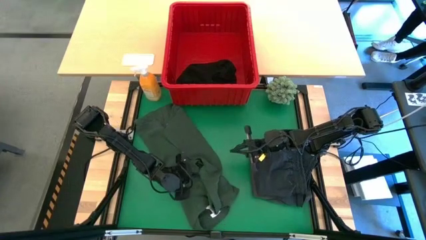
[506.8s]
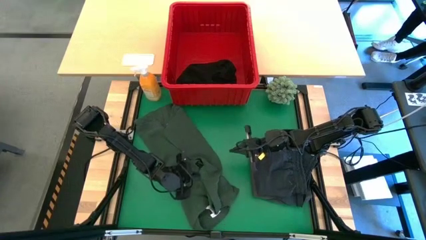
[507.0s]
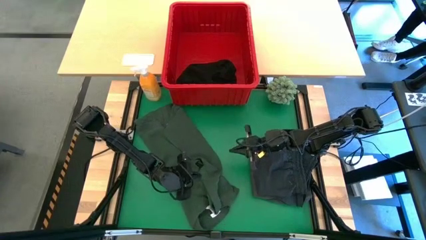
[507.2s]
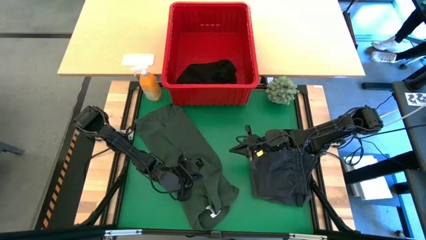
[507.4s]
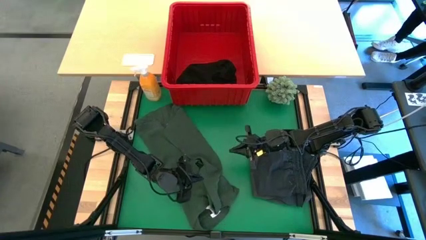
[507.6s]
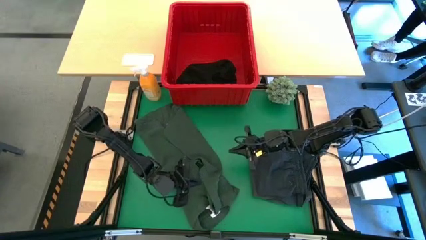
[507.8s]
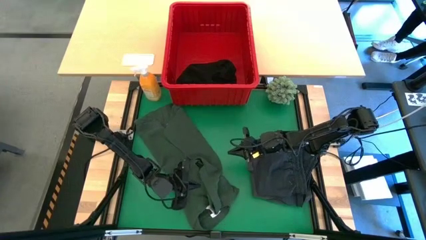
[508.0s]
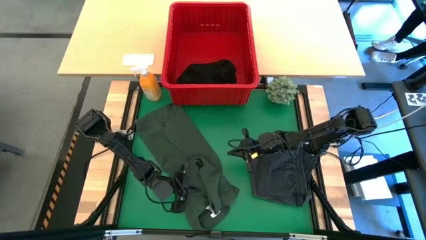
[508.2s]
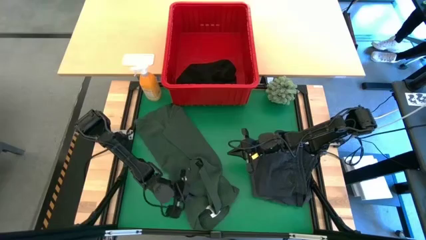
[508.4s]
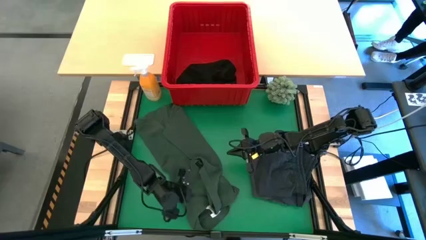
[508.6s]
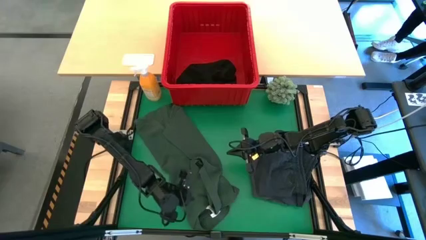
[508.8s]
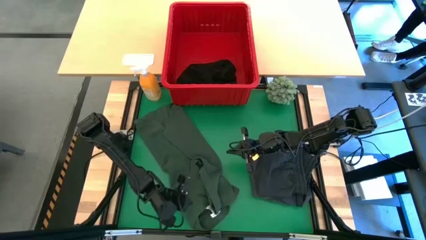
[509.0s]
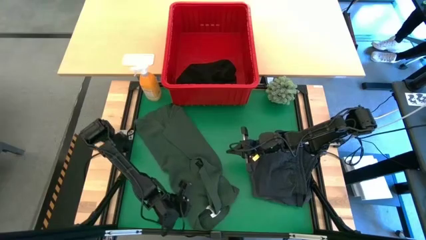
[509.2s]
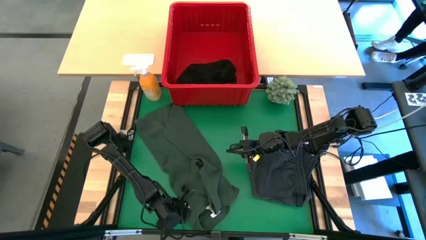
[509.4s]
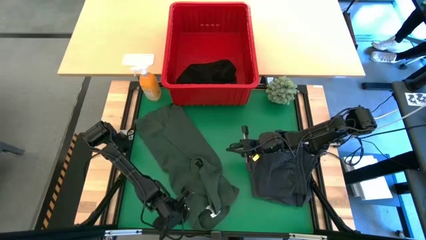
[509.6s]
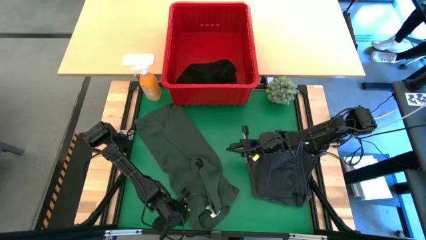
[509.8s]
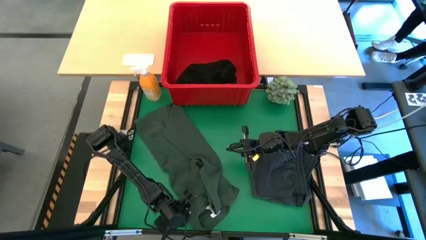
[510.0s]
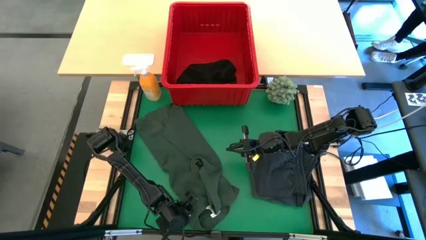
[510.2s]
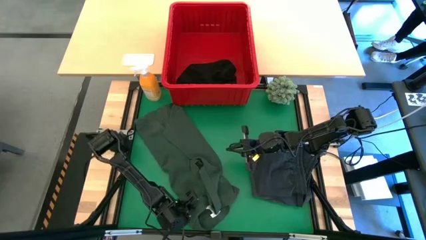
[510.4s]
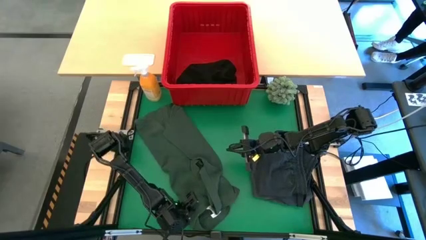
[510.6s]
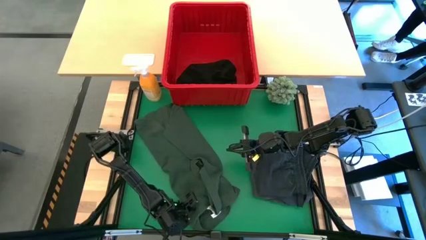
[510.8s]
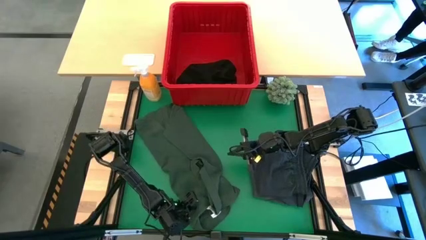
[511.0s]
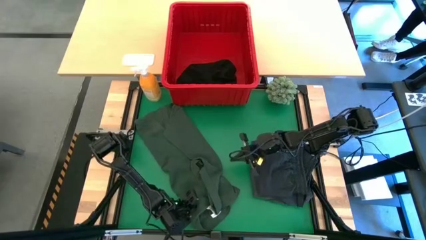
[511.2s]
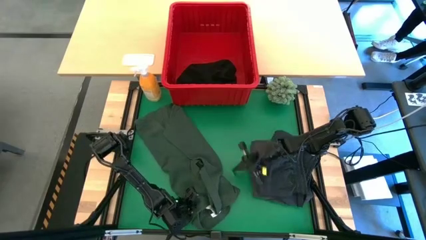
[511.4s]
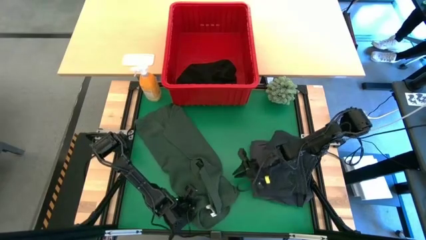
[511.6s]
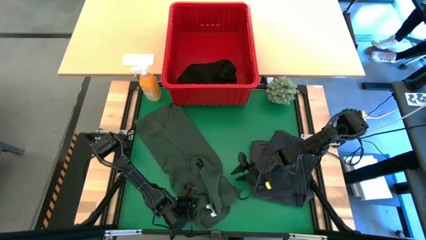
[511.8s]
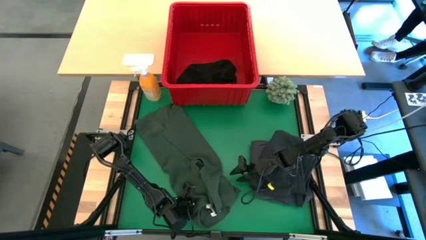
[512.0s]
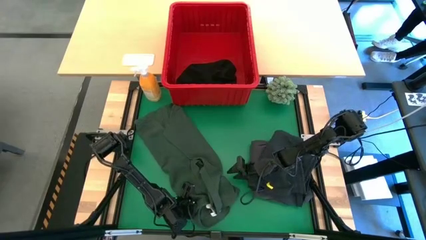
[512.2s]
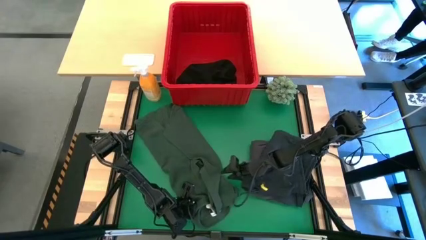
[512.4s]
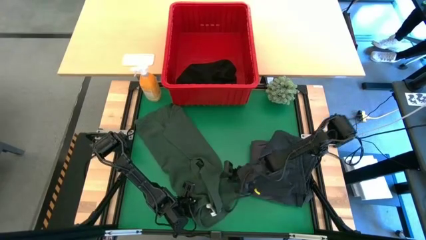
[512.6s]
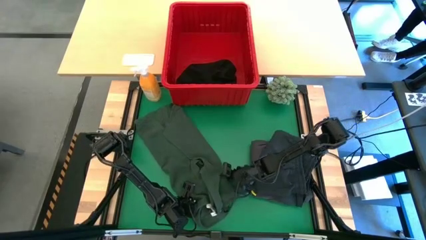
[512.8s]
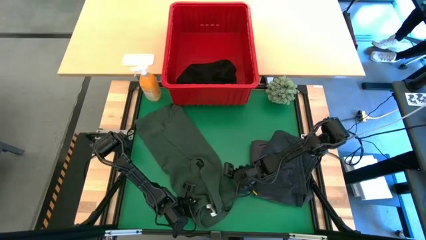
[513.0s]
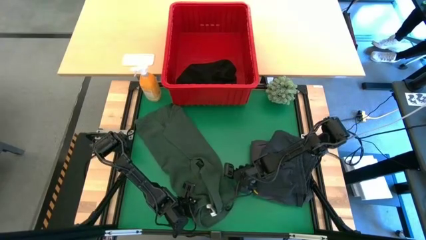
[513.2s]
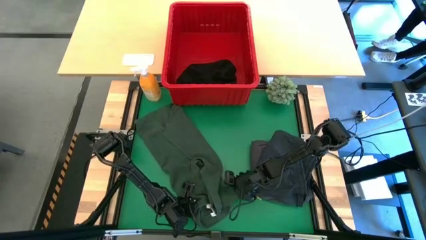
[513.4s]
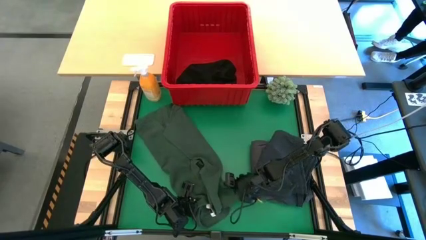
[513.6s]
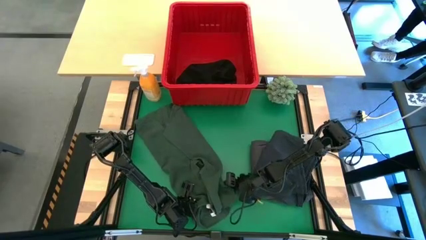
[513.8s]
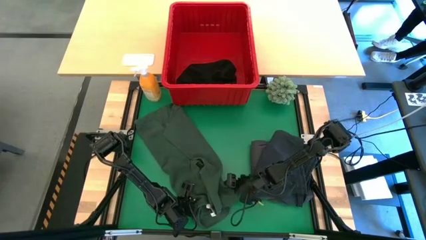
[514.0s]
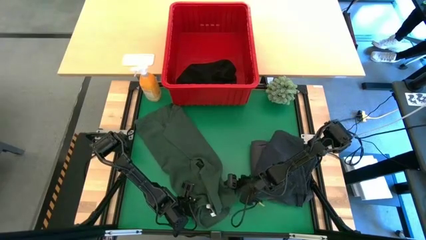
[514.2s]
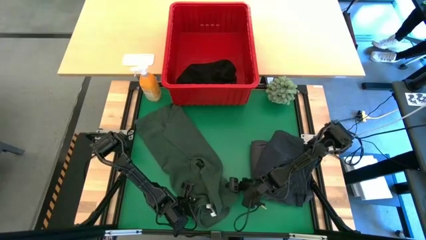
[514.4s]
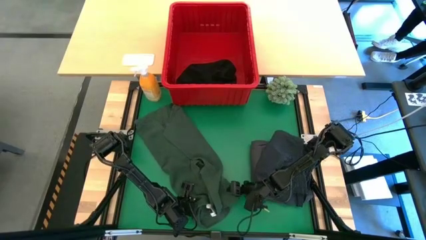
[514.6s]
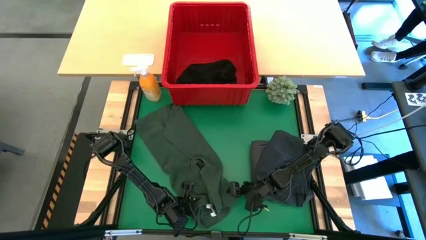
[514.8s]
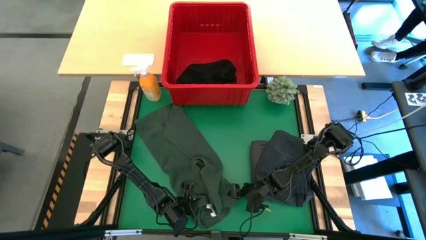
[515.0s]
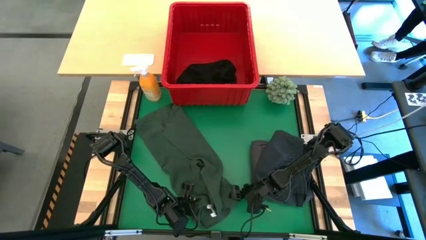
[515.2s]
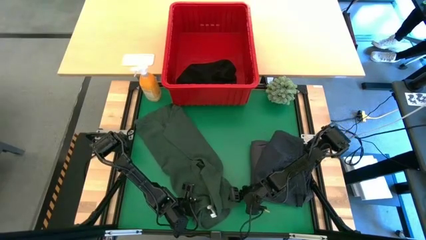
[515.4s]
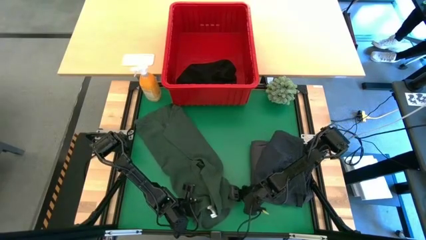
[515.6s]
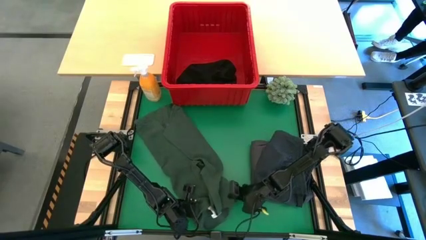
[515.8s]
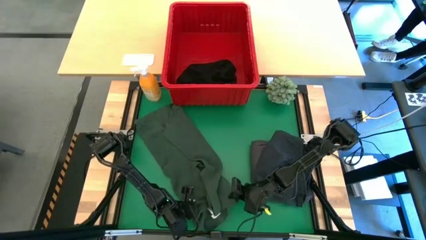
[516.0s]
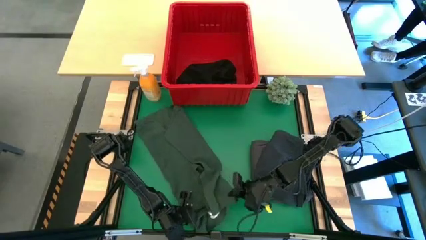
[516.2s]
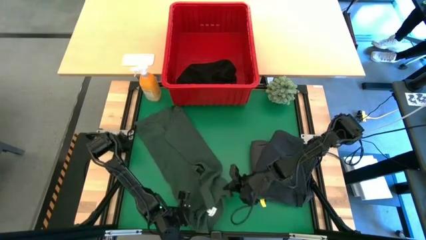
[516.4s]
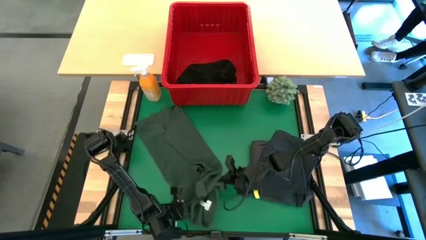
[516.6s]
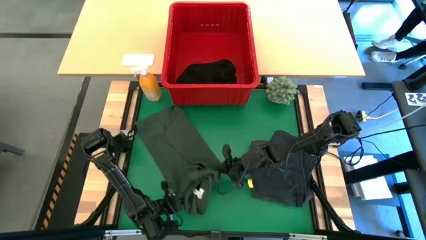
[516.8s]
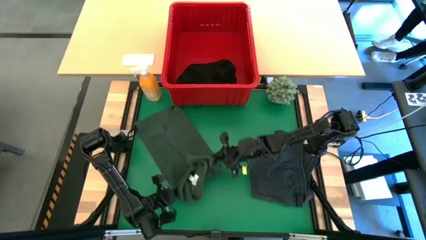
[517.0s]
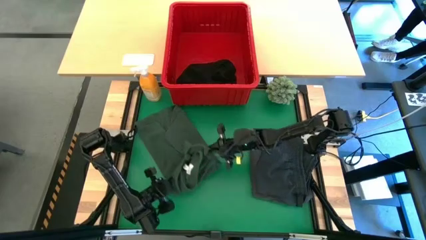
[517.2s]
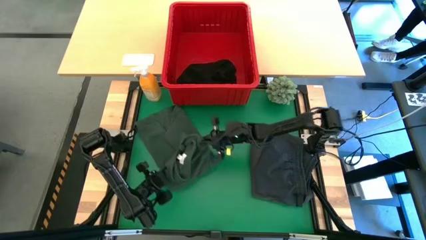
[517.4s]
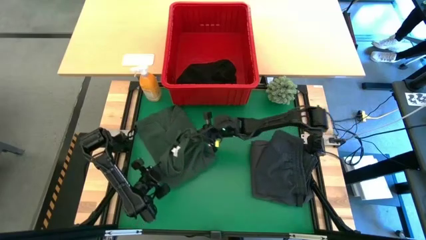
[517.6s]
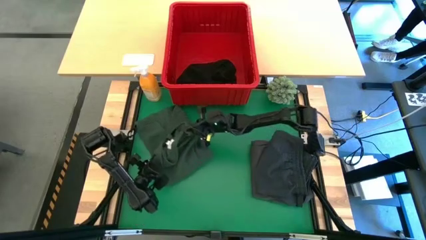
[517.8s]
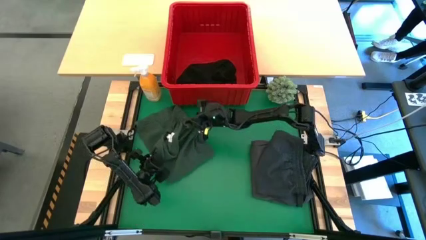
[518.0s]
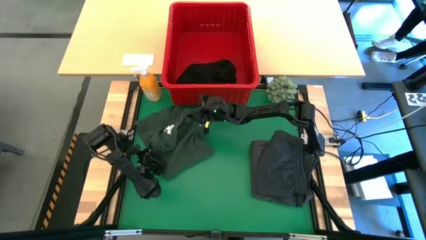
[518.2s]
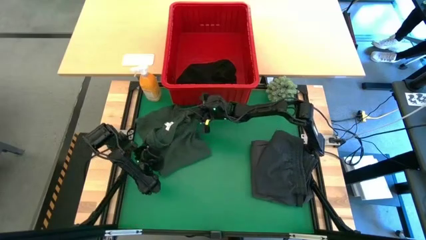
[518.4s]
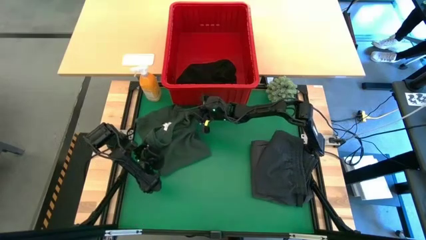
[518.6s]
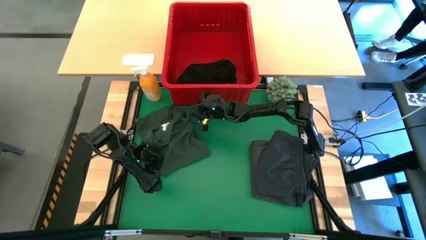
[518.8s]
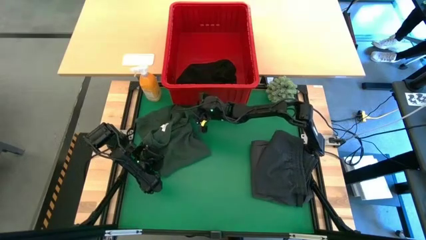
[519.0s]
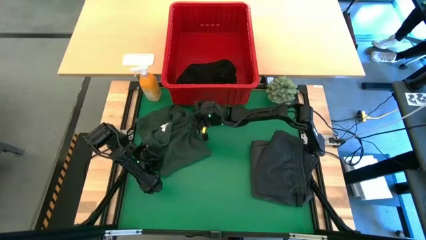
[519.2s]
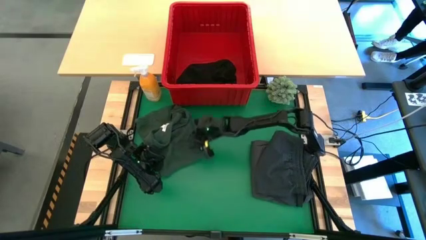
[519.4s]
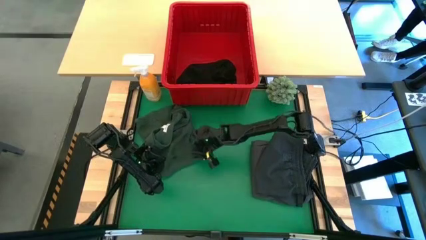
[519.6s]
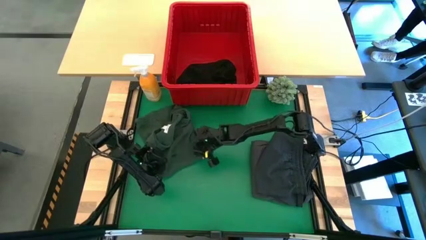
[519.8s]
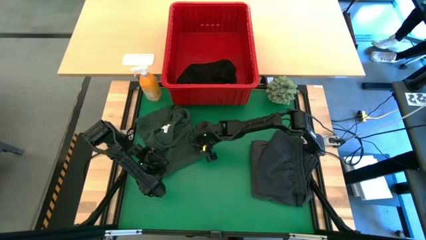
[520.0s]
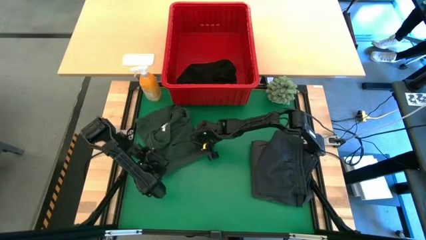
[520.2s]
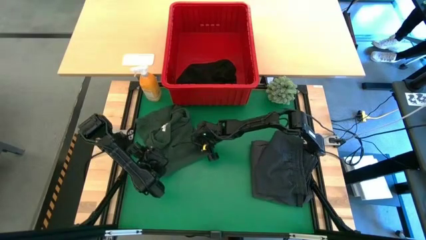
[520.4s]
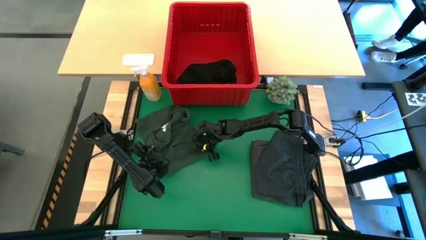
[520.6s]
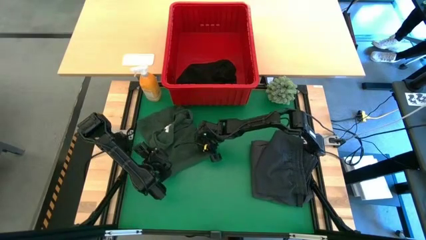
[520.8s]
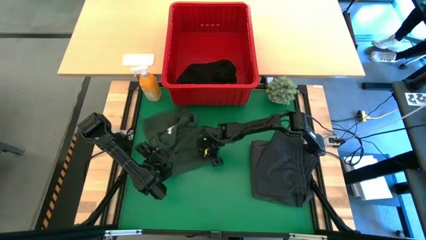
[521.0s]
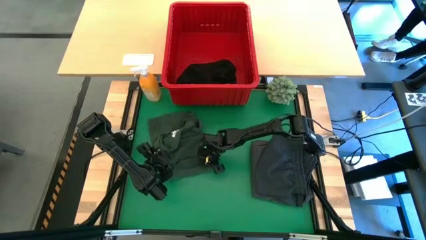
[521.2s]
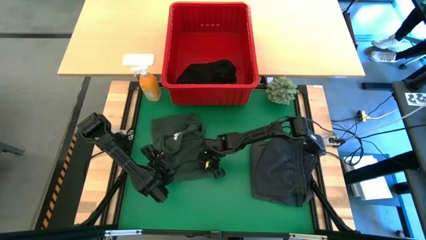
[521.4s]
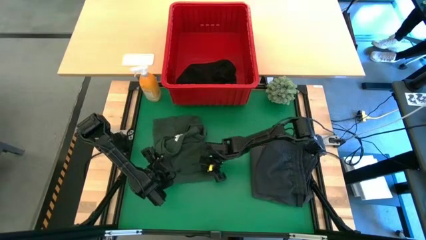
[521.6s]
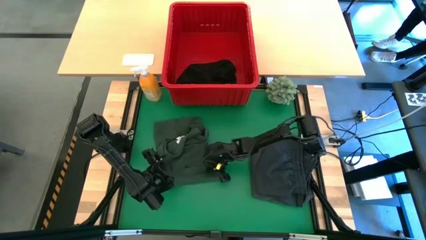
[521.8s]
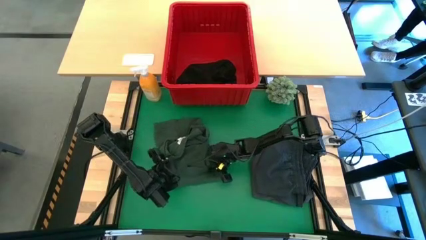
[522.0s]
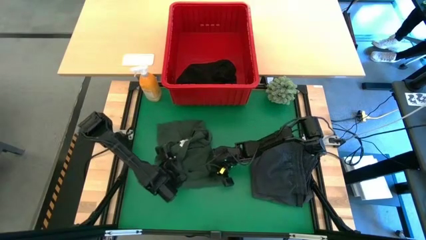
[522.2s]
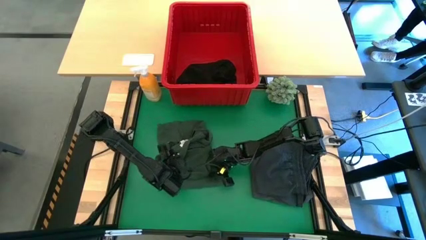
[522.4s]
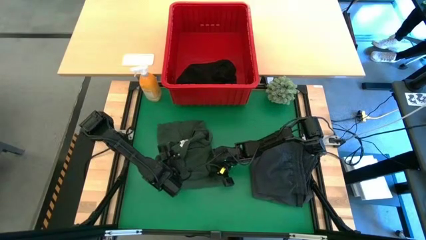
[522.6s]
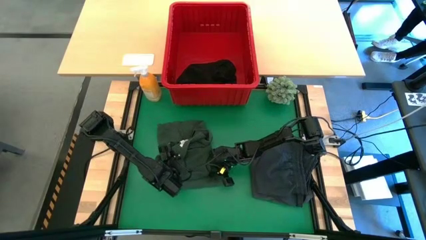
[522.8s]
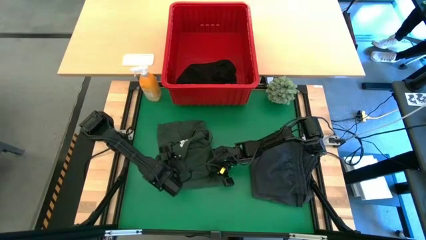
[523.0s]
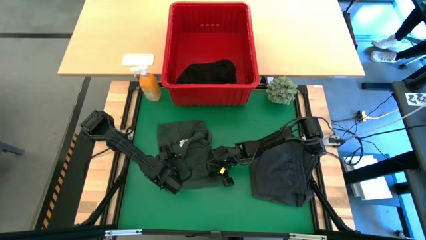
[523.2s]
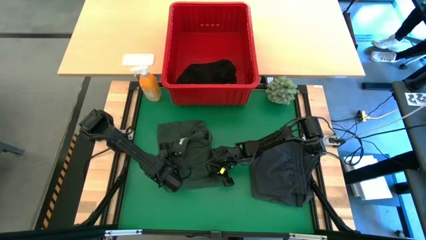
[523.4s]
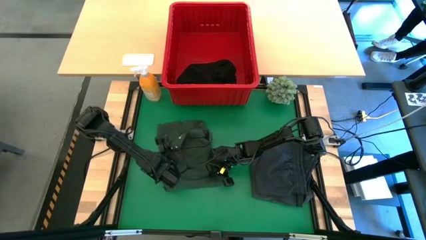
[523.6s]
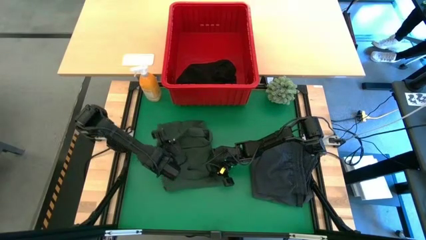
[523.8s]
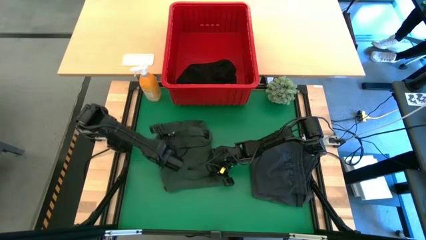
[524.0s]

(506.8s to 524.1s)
Task: Fold Laundry from Bin
Fold the green polo
